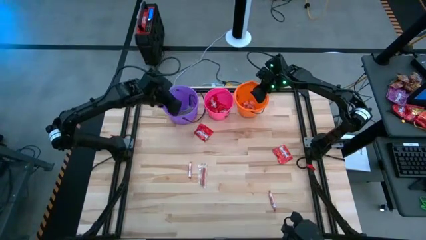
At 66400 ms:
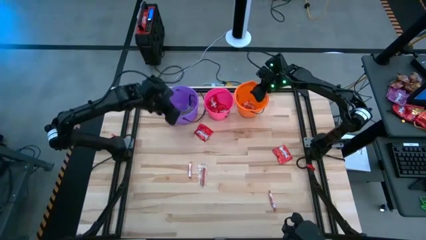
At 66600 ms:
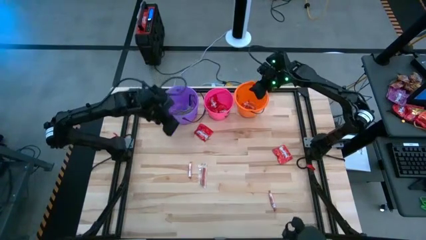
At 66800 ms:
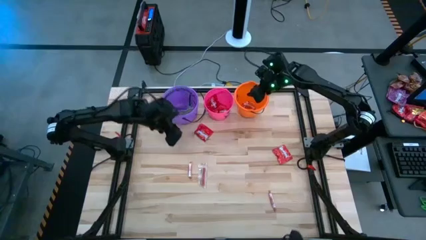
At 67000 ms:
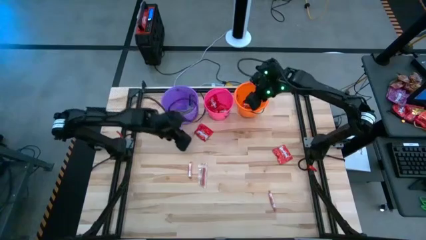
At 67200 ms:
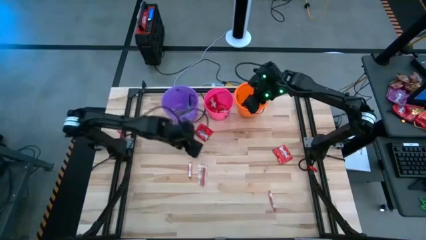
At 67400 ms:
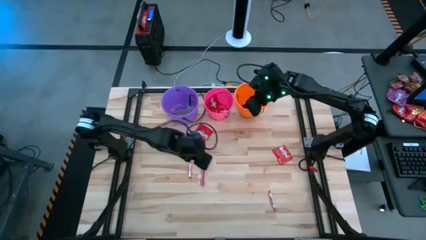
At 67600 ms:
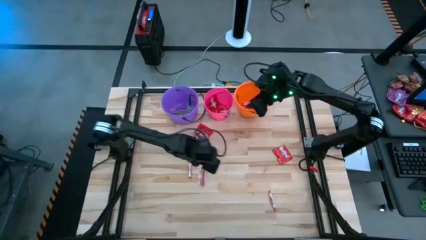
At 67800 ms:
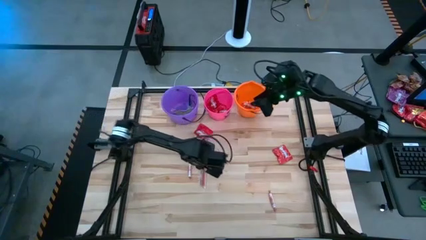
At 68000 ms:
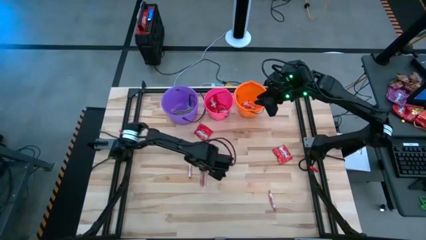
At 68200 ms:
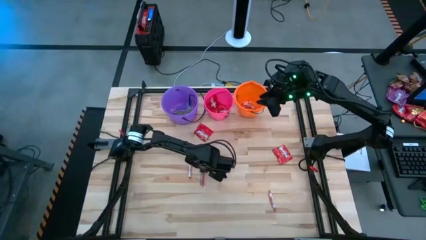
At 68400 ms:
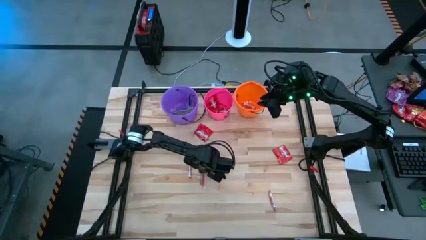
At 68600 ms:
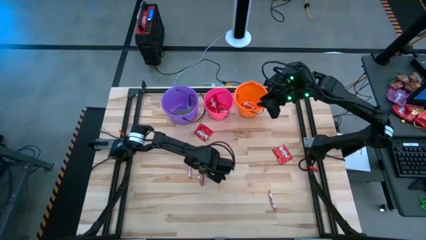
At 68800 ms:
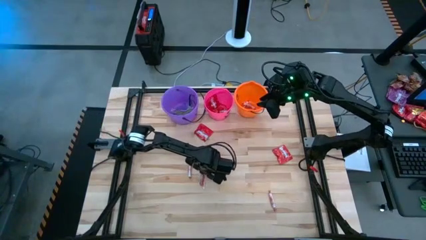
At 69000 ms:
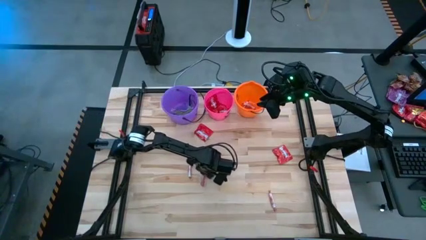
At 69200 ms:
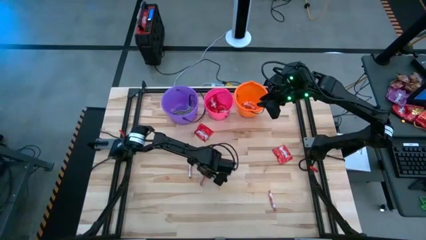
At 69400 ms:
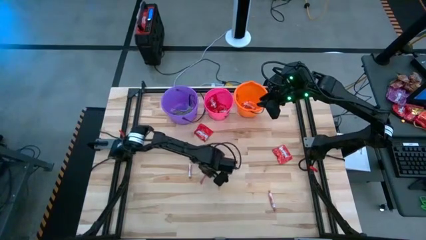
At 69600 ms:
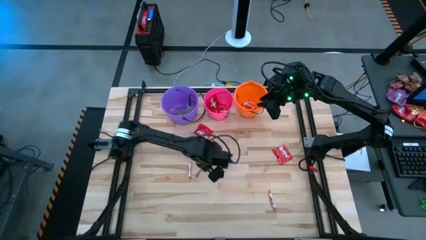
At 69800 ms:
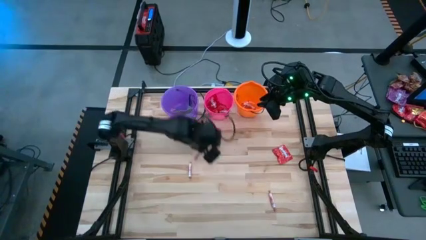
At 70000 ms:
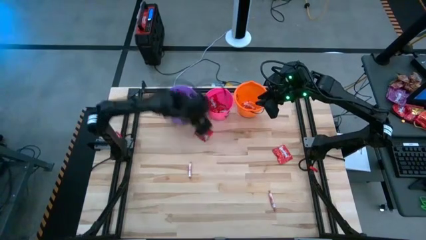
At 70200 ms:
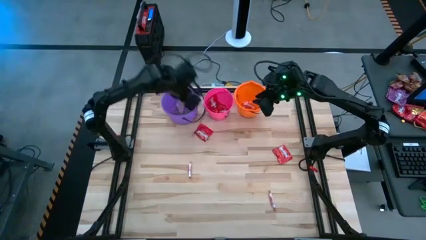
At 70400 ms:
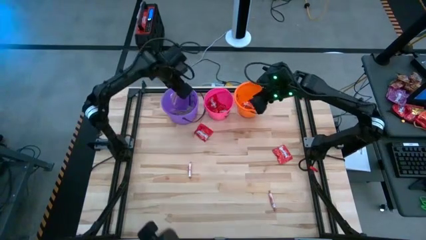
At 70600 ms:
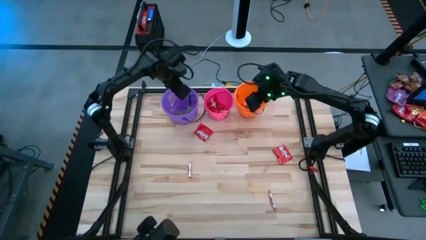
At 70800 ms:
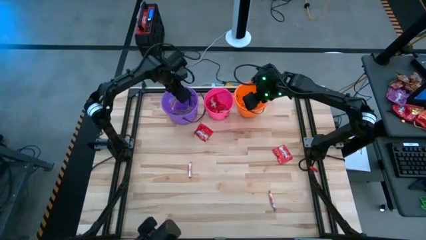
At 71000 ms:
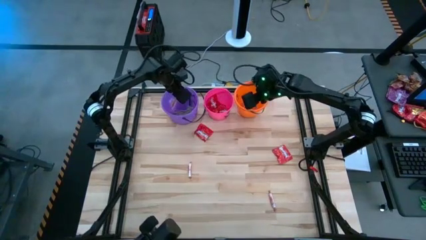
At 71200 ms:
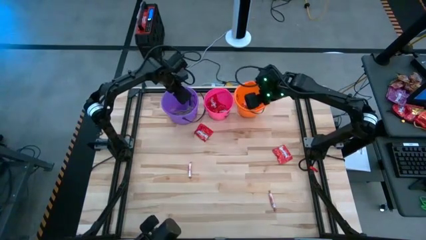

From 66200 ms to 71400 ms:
Task: Sort candy by brand, put in halloween buckets
Put the red candy into the purple bucket

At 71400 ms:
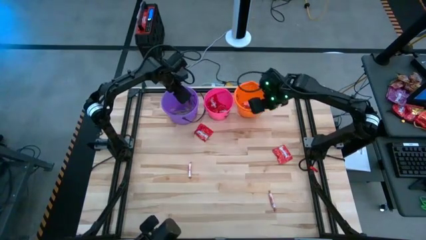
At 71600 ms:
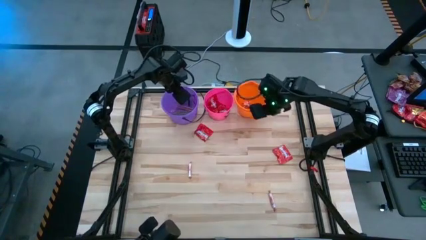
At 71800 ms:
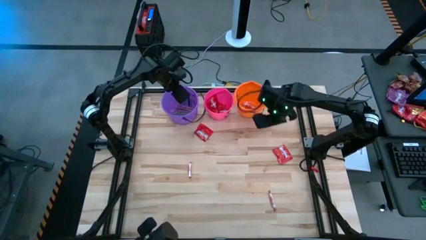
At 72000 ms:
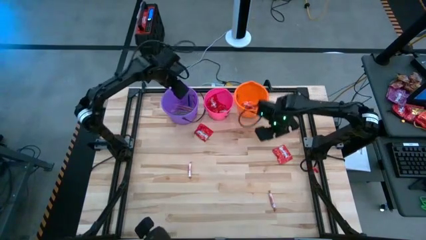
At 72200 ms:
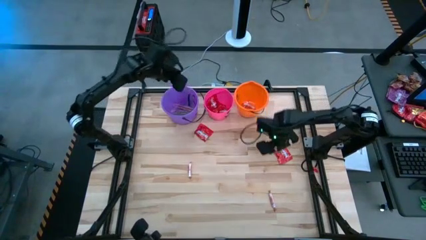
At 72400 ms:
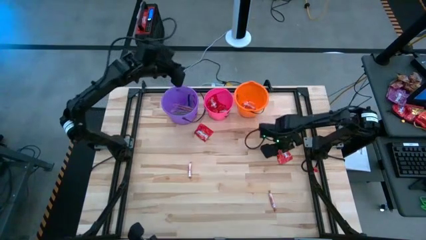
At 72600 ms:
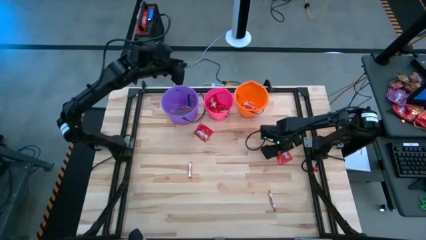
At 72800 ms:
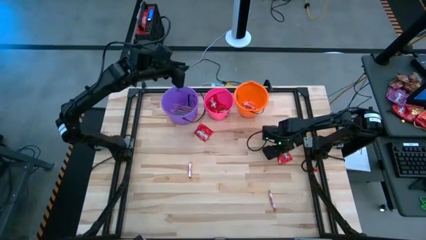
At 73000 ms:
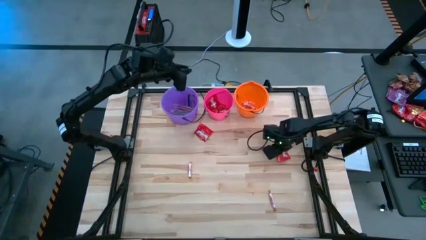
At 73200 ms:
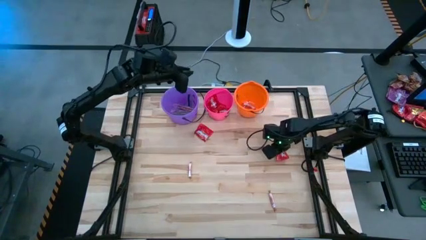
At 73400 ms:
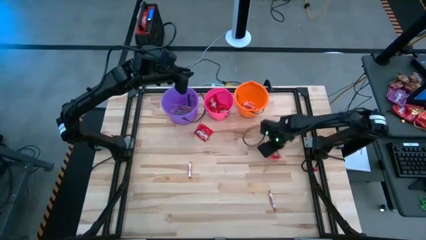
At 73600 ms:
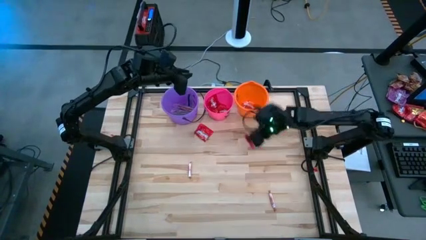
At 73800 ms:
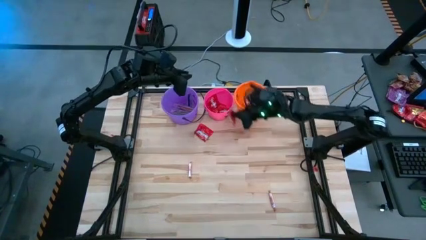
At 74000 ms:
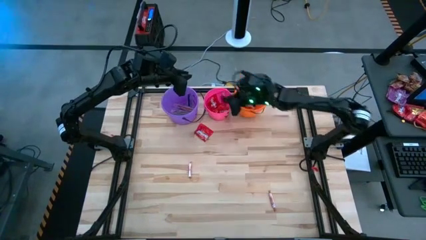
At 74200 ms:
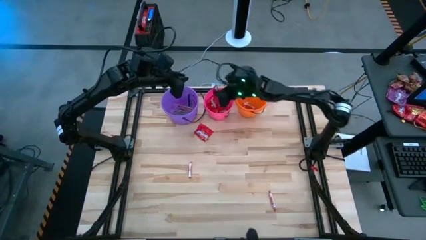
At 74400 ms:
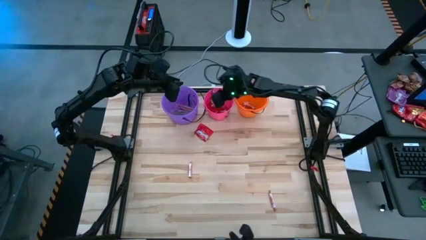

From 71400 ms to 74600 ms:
Put the red candy pack into the pink bucket

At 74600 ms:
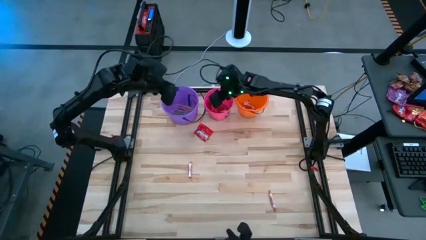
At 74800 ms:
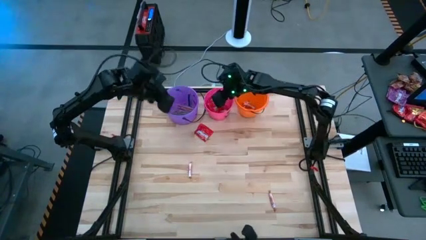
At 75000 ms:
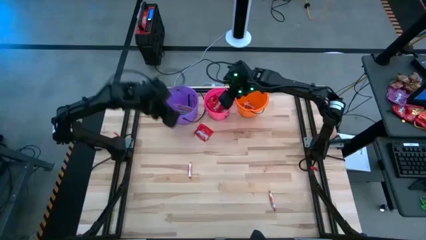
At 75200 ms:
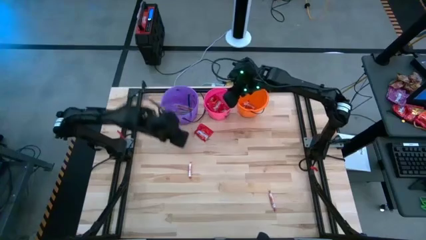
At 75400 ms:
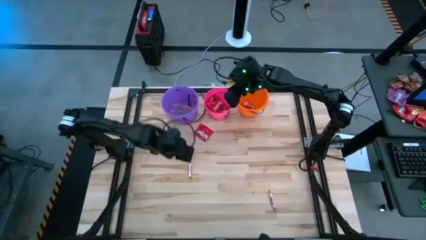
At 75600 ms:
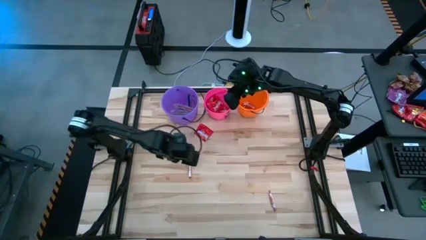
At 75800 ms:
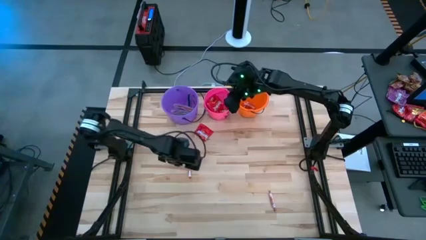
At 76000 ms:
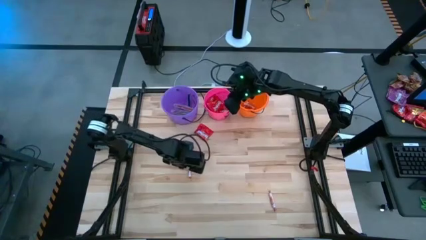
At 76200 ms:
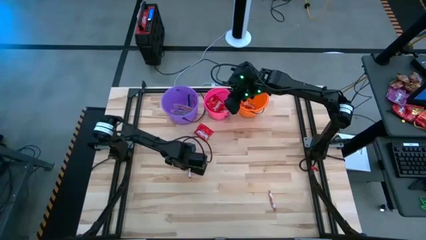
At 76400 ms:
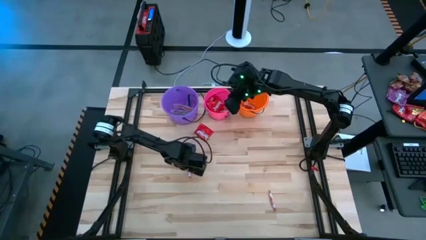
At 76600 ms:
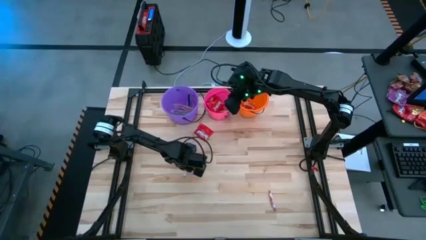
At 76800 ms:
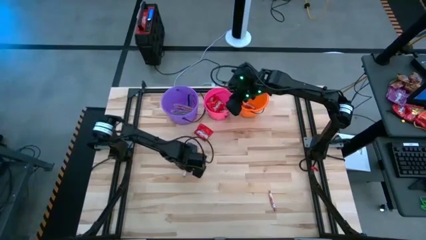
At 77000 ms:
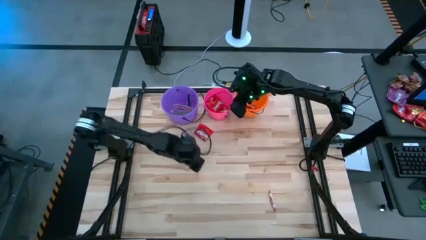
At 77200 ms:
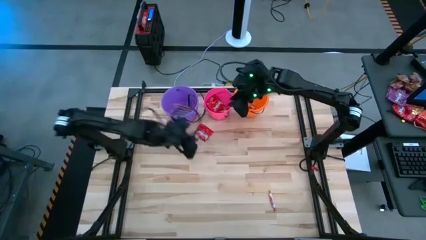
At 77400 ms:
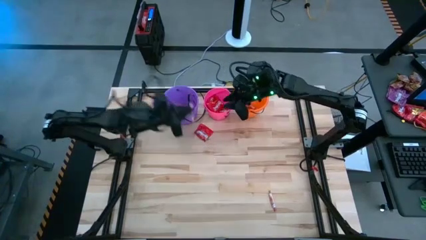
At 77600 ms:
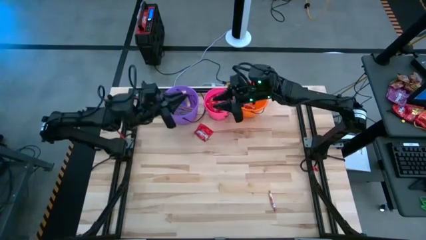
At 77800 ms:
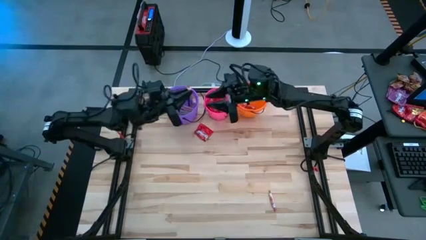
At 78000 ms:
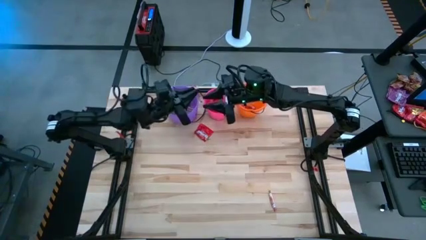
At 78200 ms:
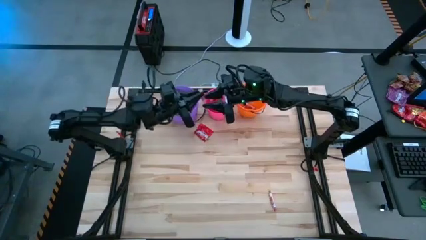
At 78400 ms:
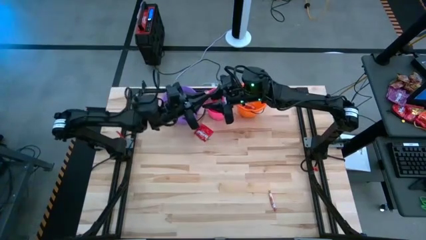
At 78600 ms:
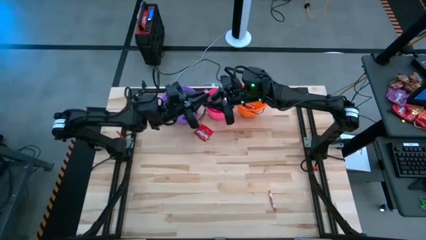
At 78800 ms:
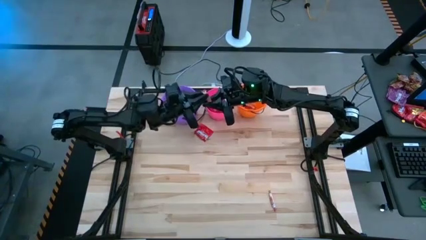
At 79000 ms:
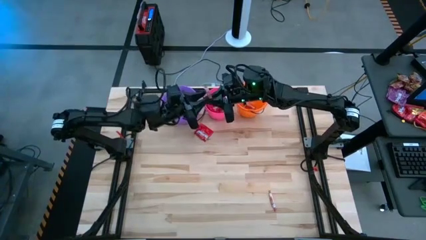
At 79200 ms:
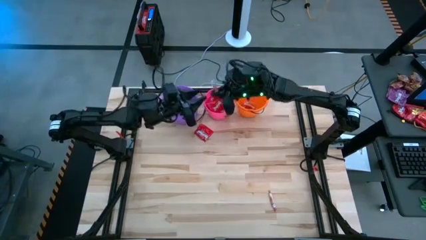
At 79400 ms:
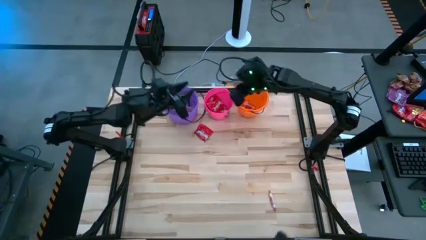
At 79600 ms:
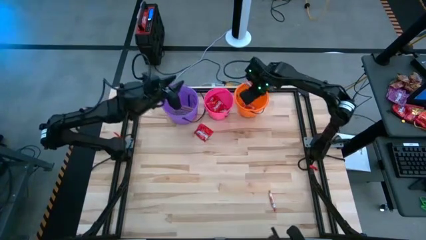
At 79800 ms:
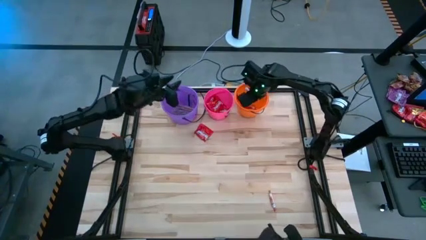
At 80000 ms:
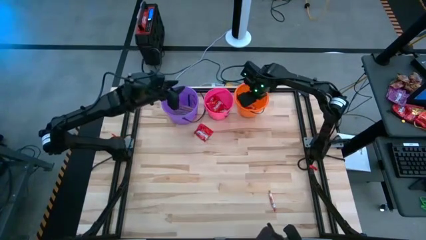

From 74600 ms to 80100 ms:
Put the transparent candy roll into the orange bucket

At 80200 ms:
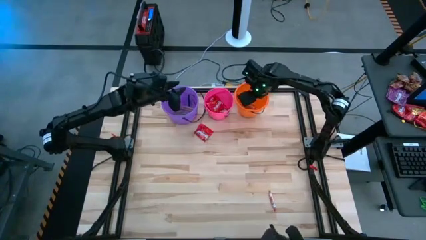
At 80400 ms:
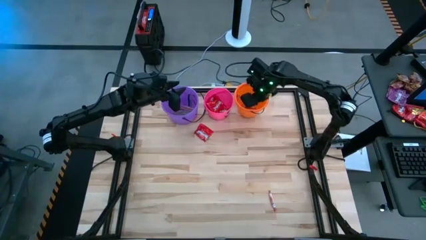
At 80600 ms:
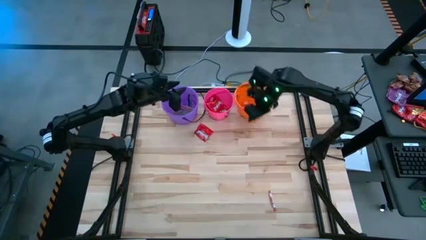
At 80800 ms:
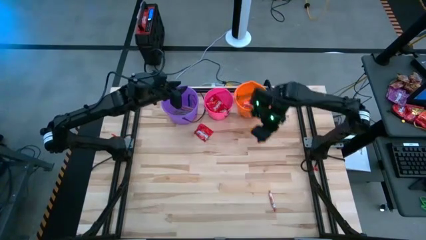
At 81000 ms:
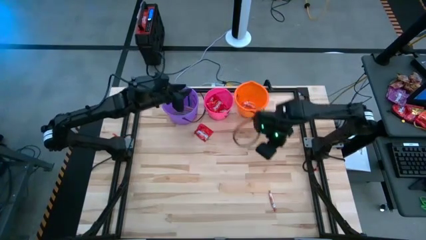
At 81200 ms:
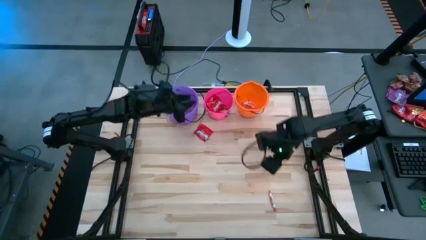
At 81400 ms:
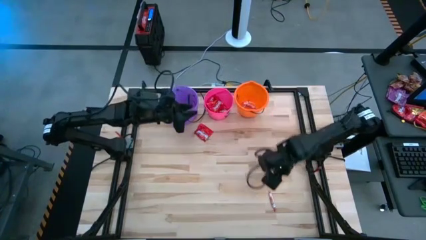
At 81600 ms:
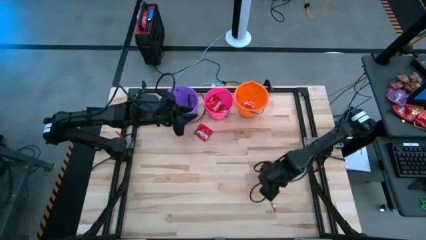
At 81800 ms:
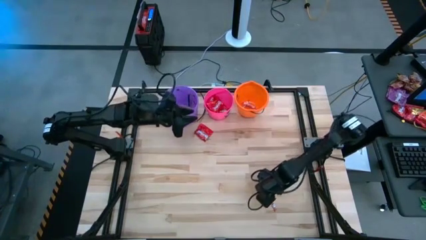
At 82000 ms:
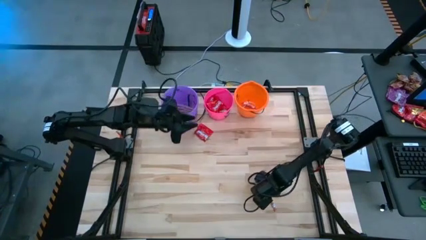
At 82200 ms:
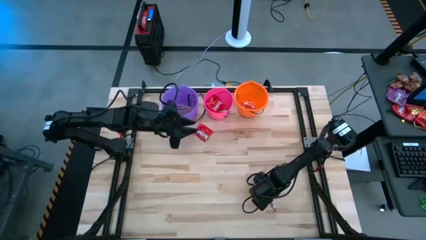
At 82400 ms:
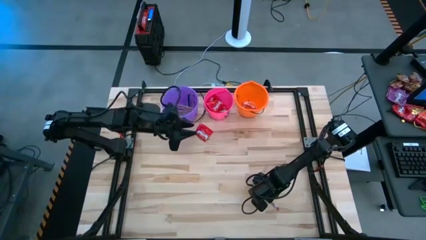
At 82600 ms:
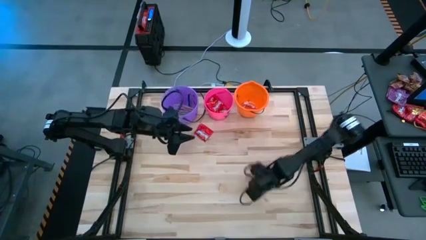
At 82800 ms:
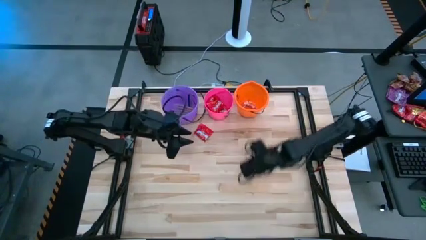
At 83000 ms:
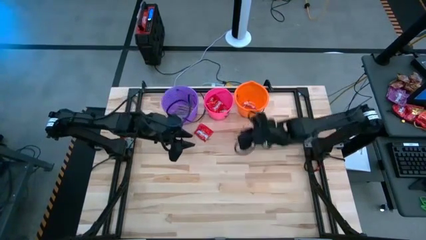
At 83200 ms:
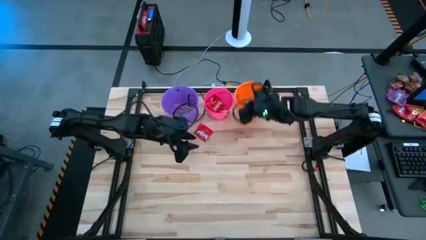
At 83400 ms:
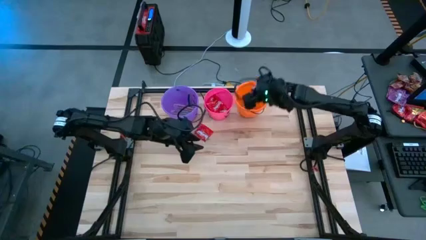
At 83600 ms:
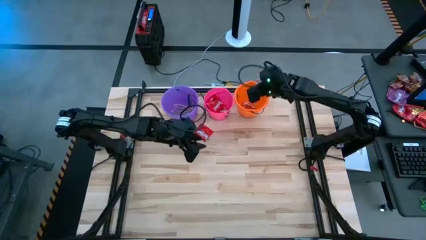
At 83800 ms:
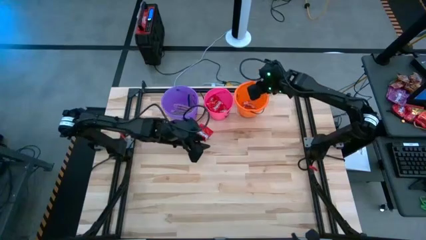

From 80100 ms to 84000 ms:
Put the transparent candy roll into the orange bucket
